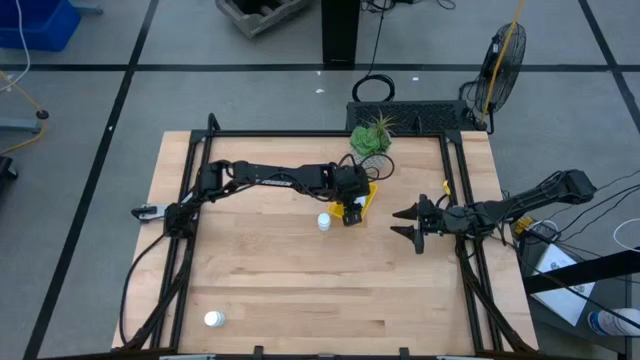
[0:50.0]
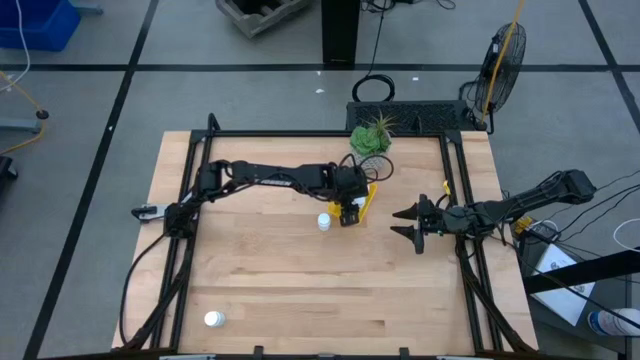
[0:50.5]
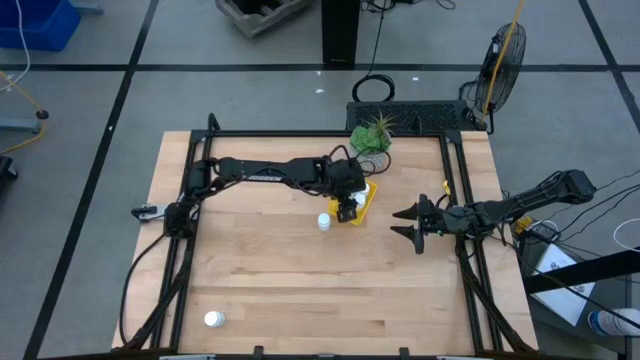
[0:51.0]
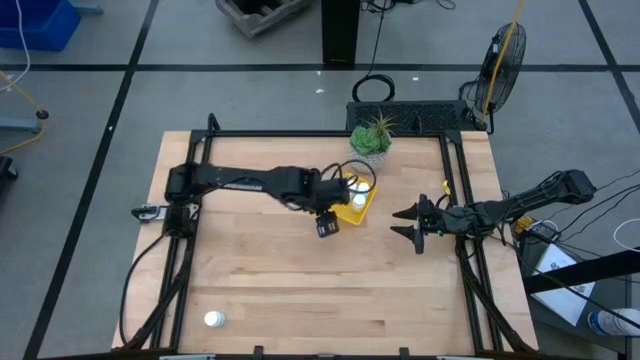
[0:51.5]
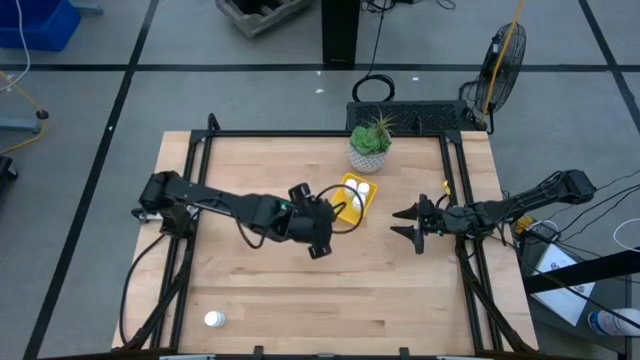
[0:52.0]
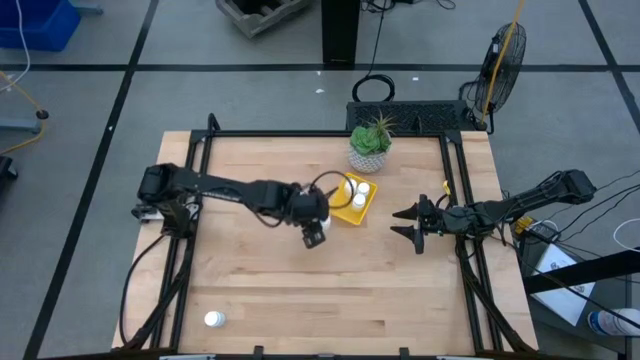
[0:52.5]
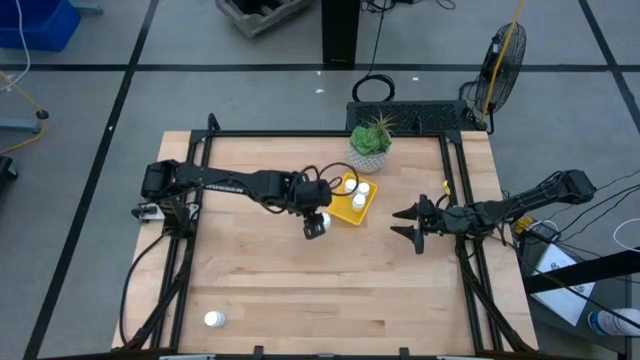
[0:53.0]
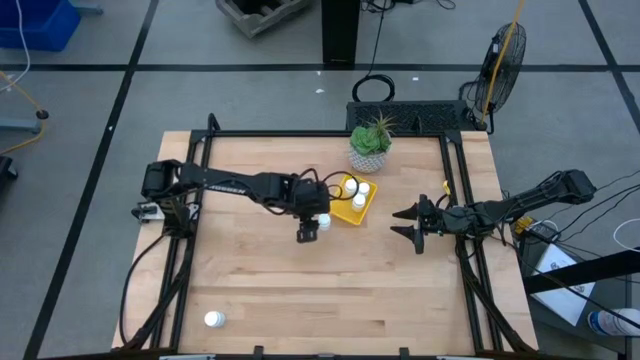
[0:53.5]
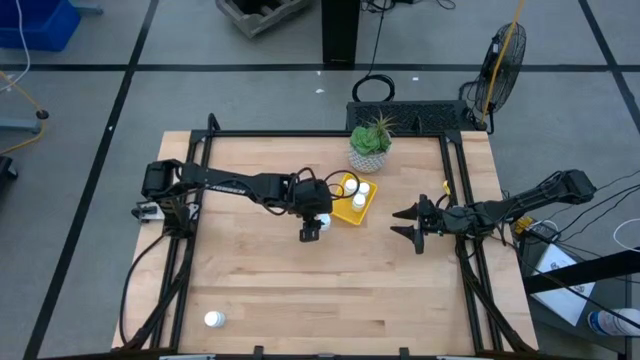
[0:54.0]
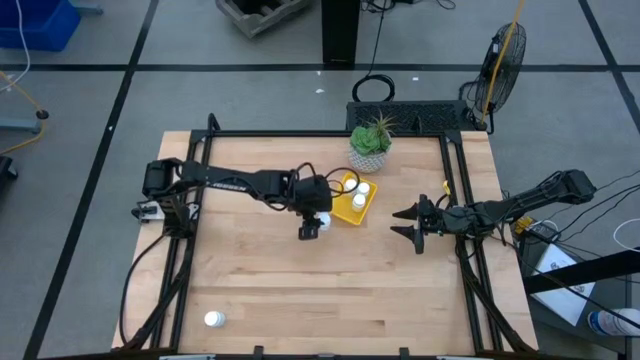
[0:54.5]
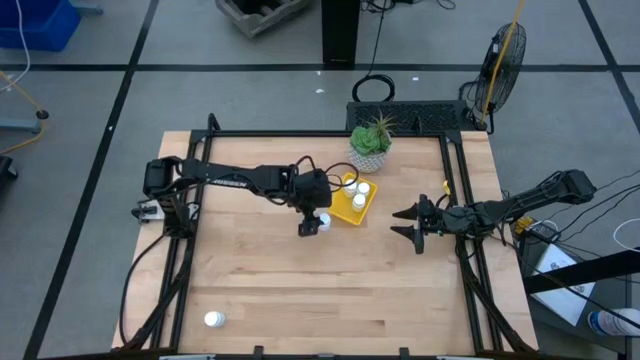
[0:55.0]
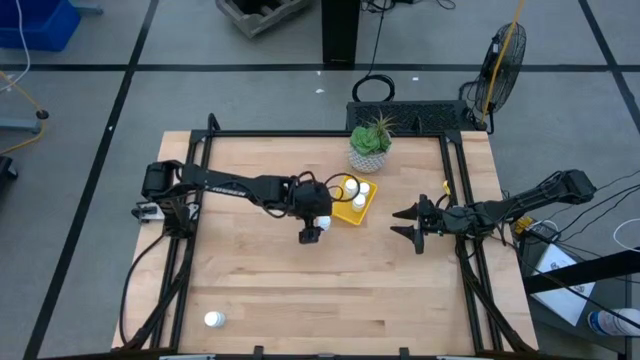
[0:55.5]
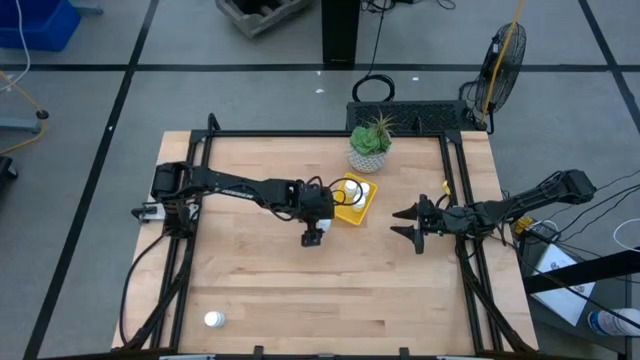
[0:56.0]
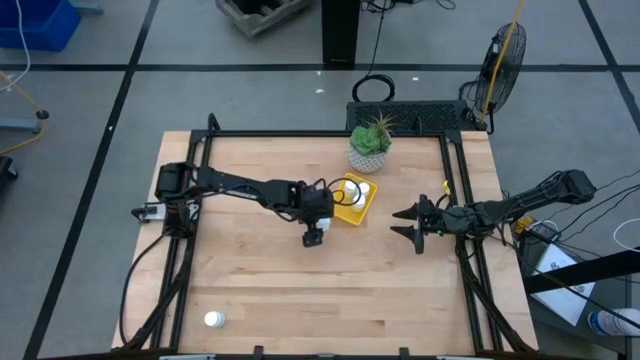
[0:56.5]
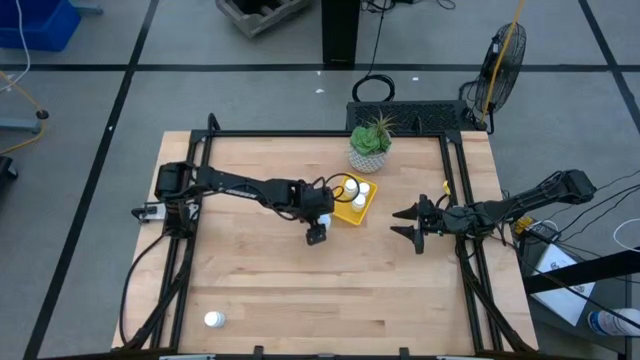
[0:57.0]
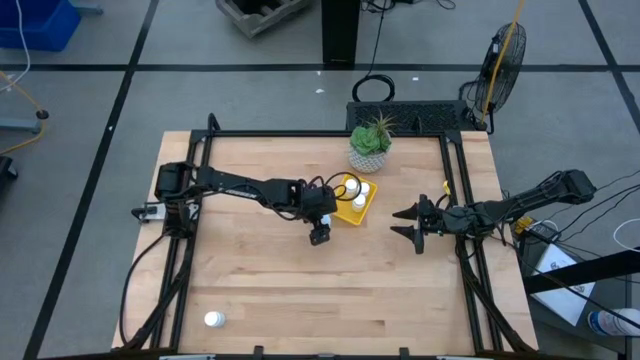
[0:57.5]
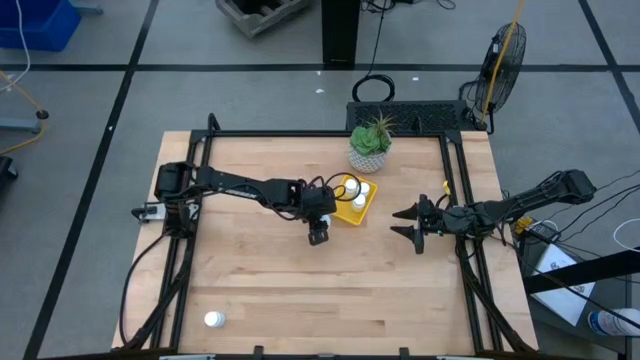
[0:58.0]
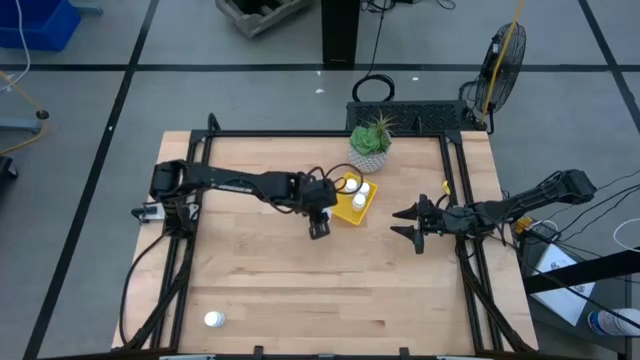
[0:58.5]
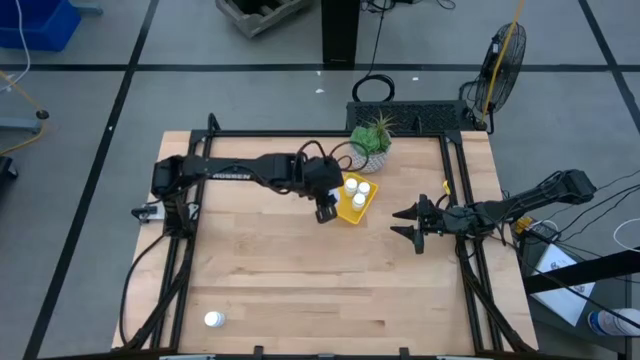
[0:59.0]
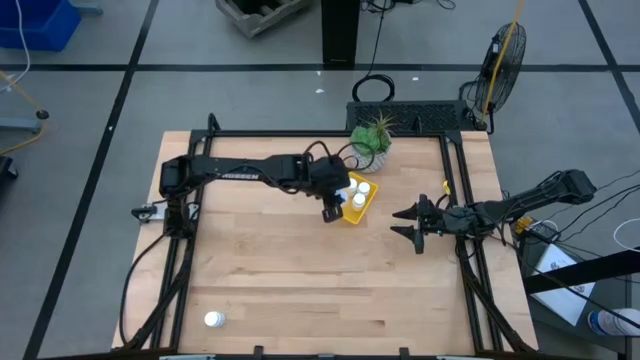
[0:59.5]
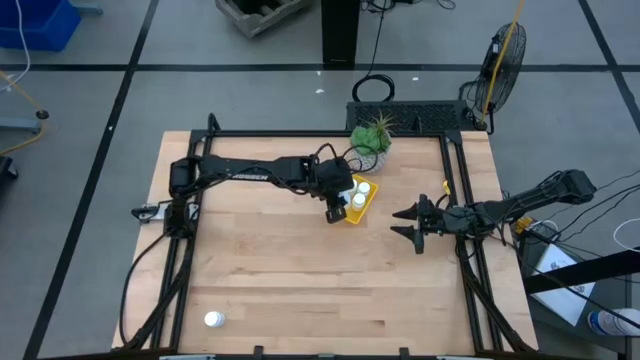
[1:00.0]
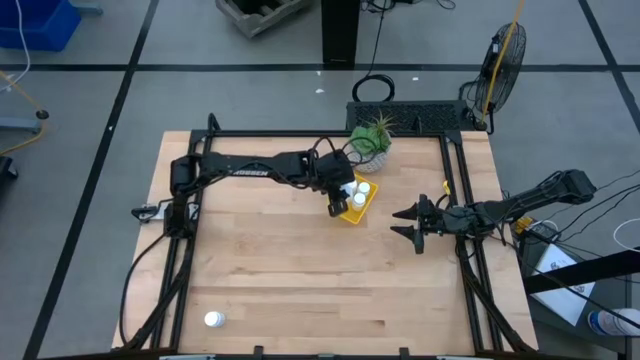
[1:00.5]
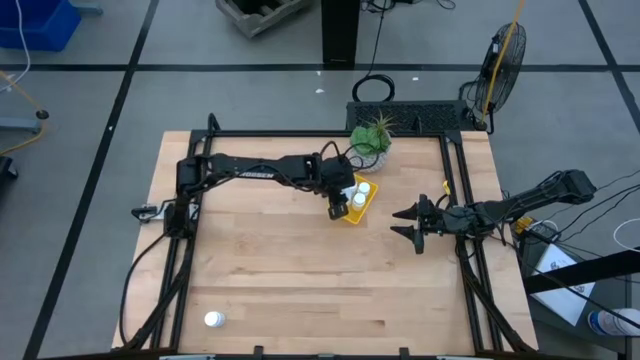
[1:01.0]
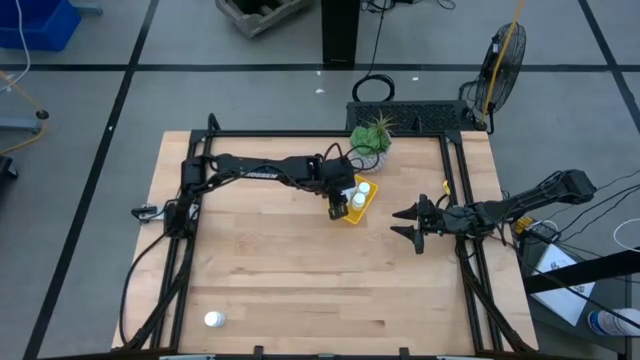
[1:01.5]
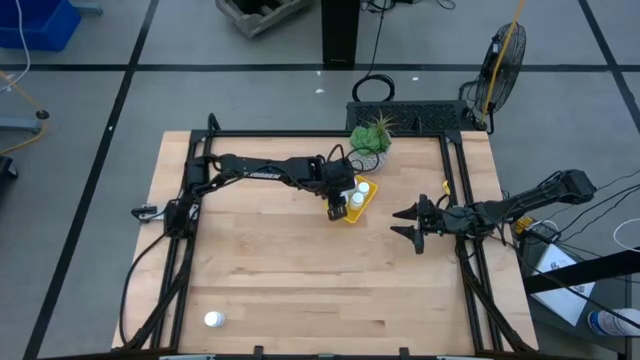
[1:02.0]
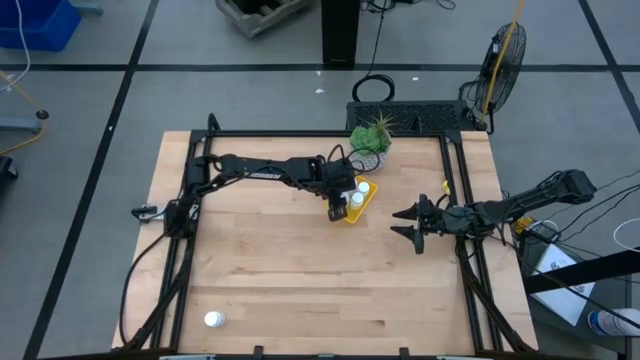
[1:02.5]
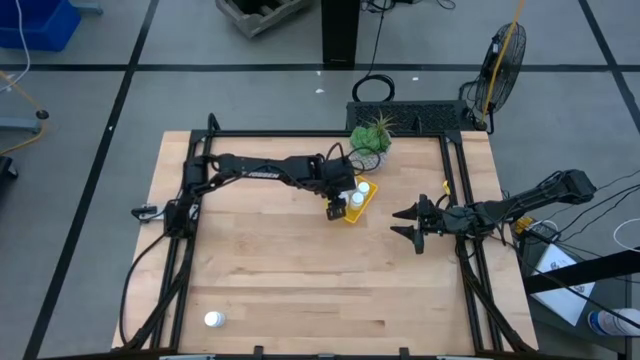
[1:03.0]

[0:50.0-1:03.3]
Task: Pick and place pill bottles into a basket
Put the top white medicine bottle into the bin

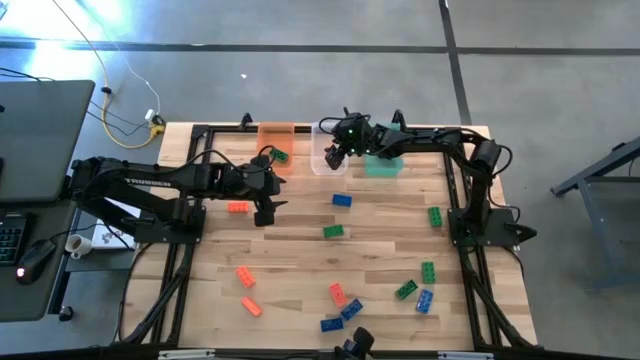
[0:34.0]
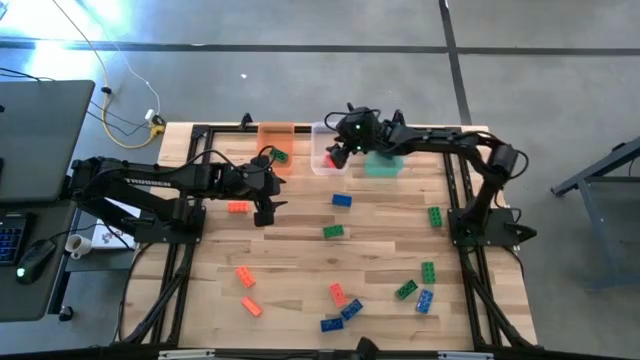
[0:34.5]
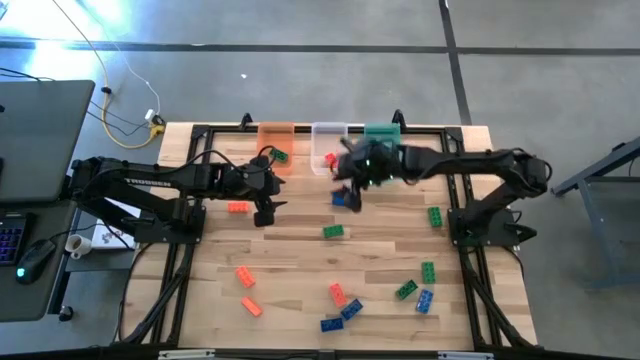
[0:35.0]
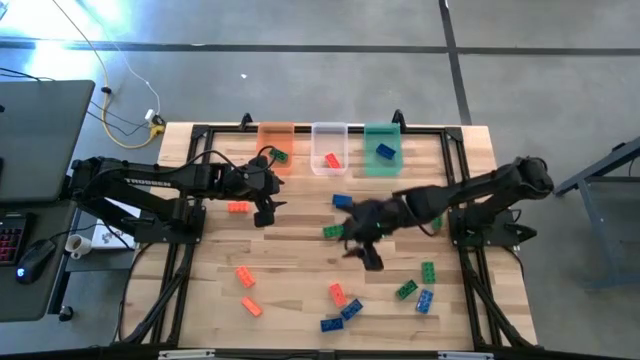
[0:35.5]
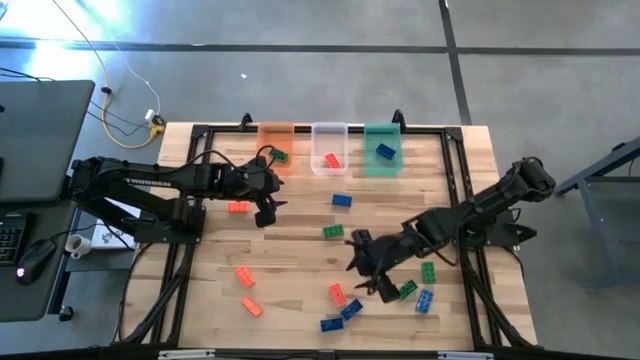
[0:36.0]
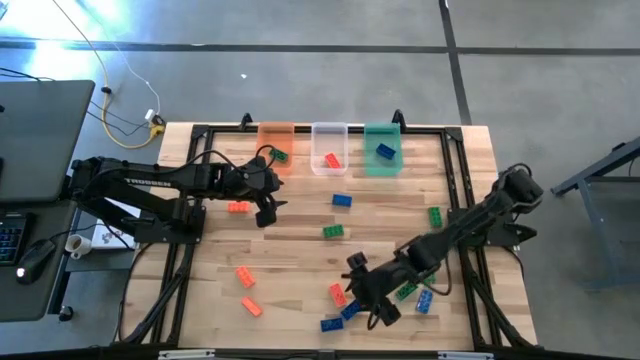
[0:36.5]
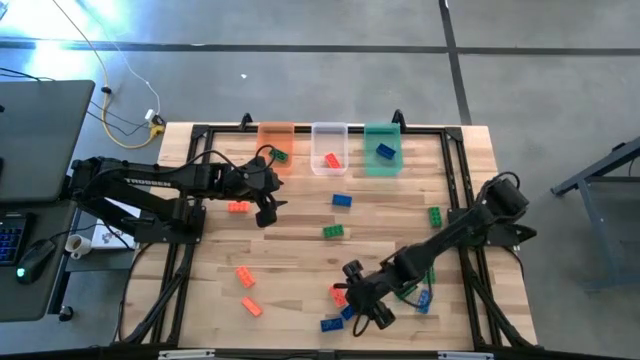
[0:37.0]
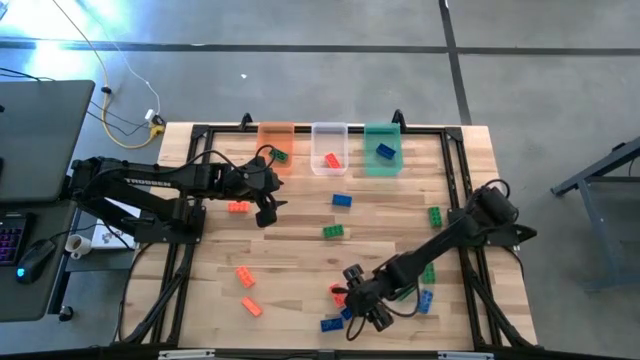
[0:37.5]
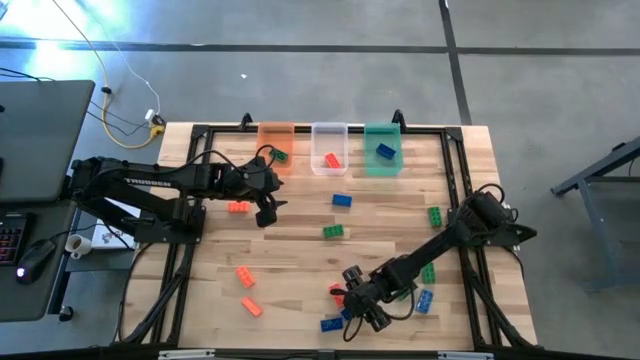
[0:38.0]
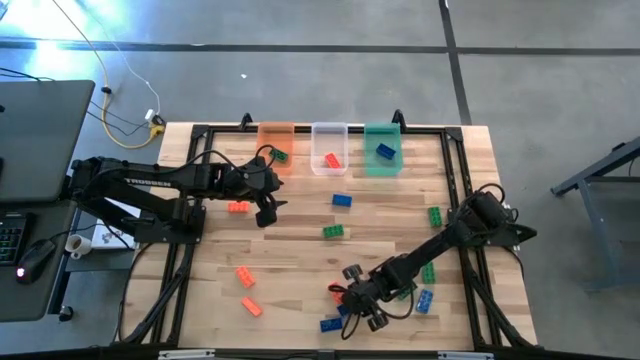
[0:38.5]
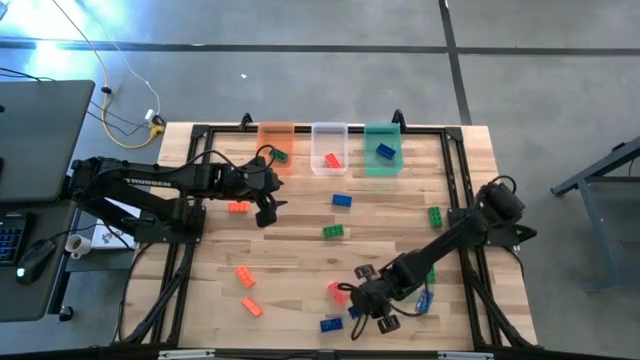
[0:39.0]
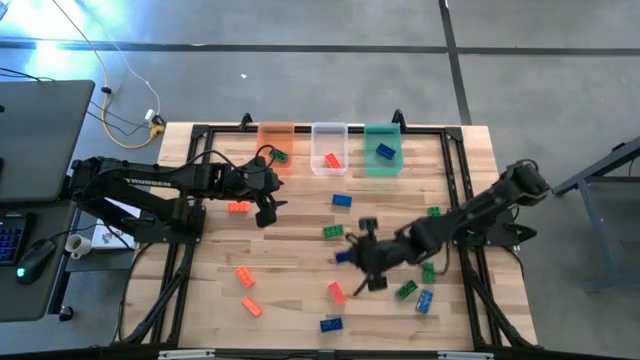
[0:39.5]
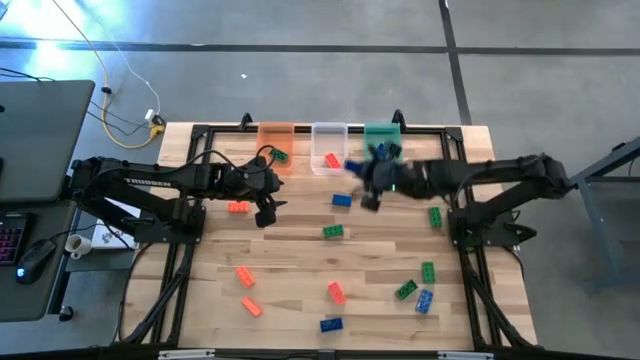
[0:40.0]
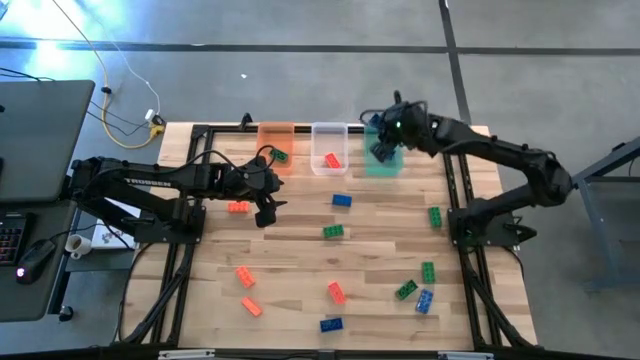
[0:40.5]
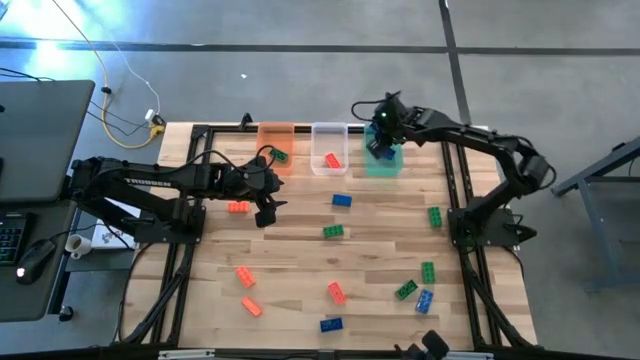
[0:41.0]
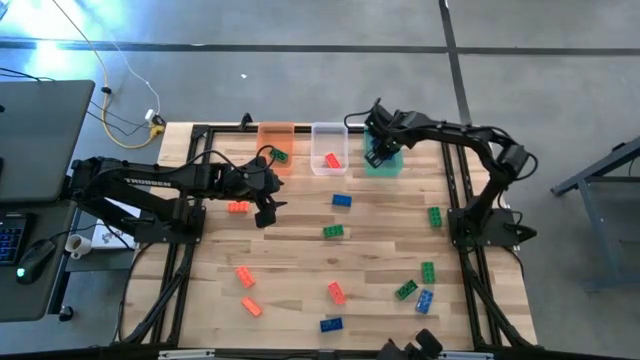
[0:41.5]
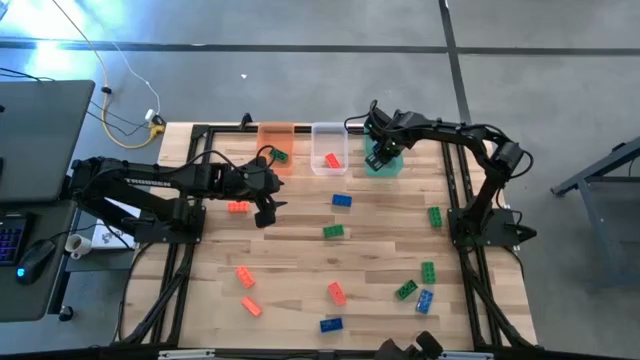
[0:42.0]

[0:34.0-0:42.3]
Task: Sort & place blocks by color
Put the blue game piece into the green bin
